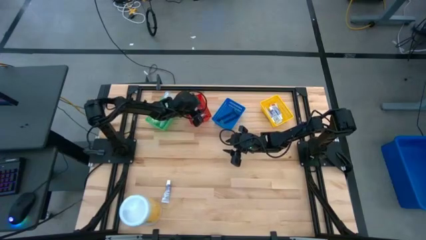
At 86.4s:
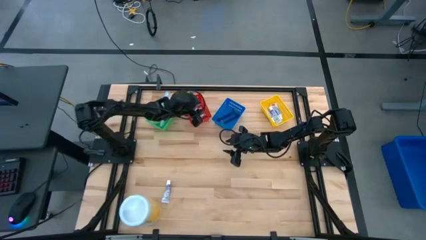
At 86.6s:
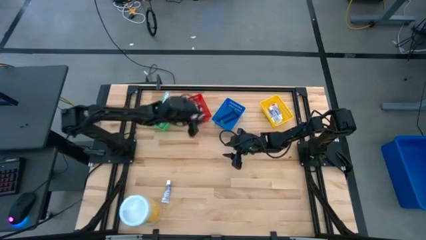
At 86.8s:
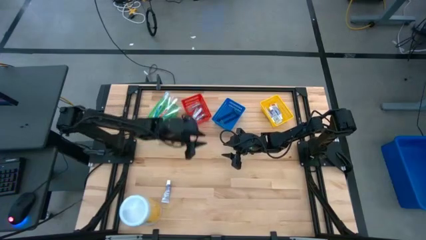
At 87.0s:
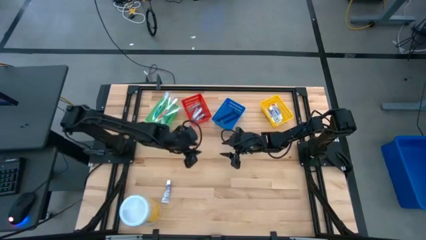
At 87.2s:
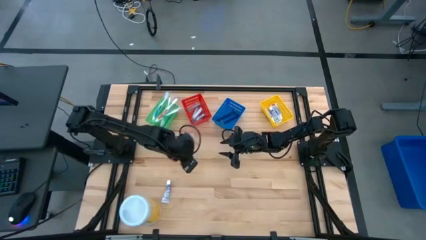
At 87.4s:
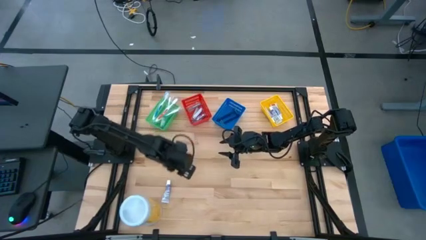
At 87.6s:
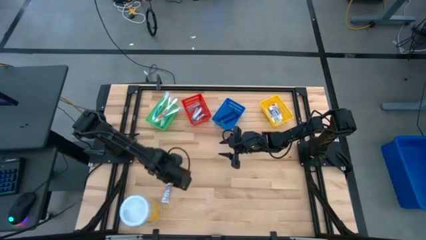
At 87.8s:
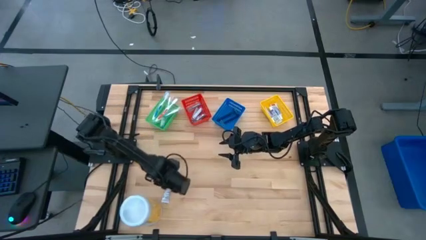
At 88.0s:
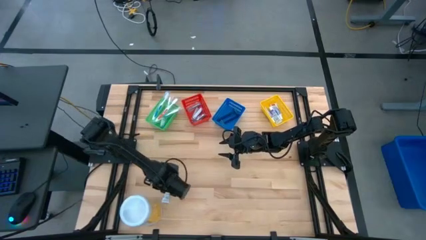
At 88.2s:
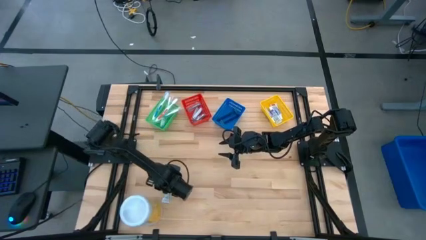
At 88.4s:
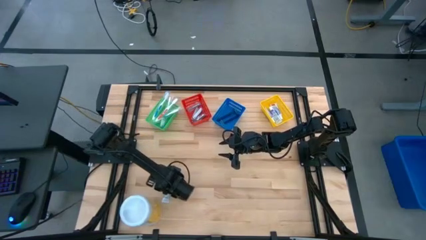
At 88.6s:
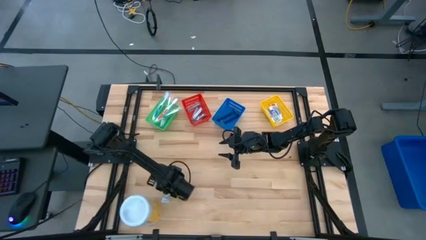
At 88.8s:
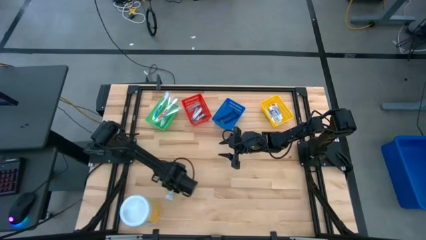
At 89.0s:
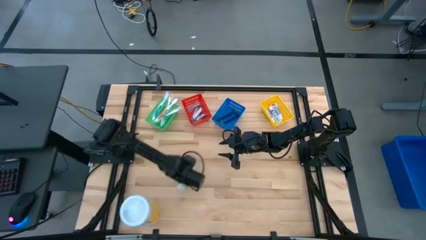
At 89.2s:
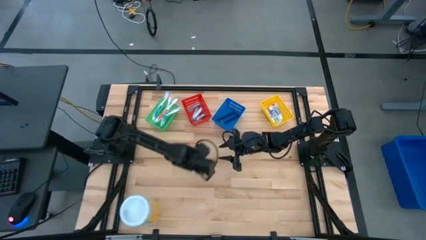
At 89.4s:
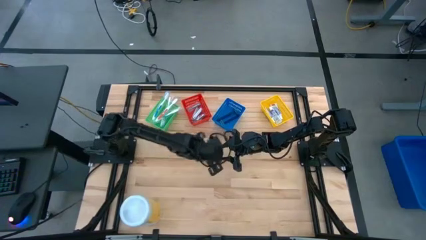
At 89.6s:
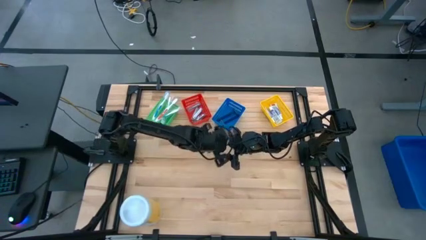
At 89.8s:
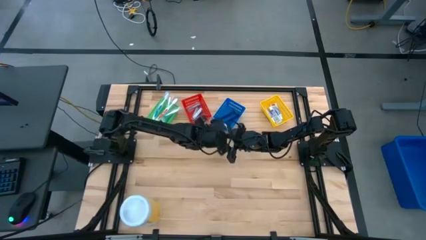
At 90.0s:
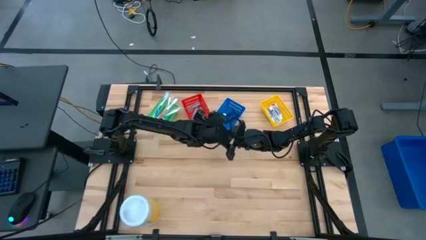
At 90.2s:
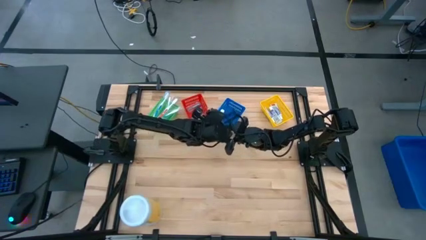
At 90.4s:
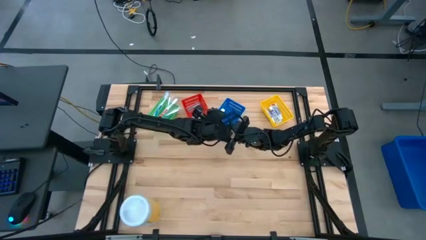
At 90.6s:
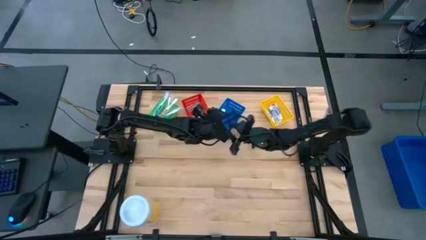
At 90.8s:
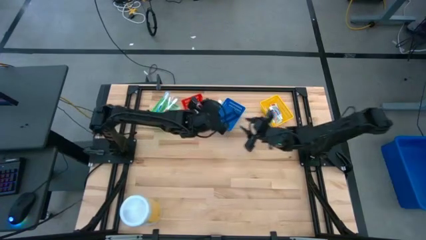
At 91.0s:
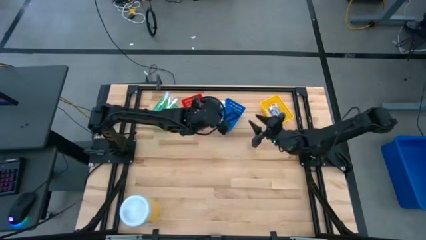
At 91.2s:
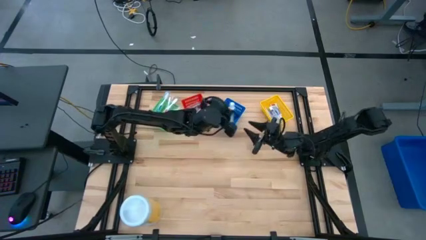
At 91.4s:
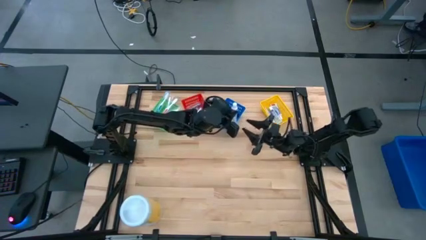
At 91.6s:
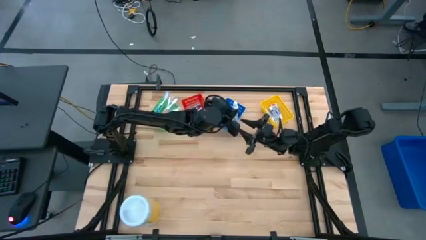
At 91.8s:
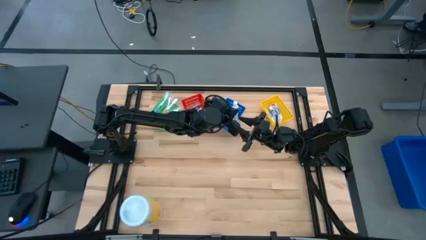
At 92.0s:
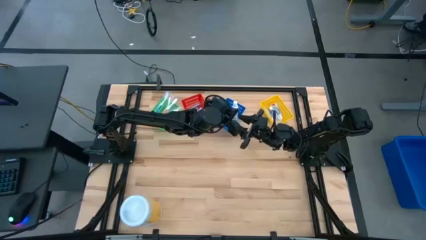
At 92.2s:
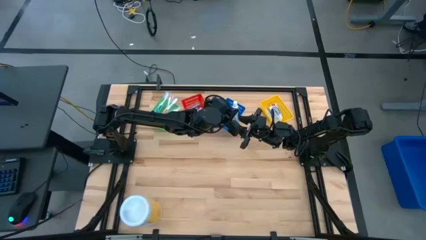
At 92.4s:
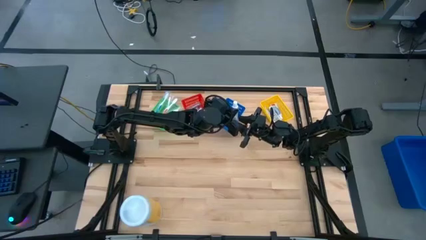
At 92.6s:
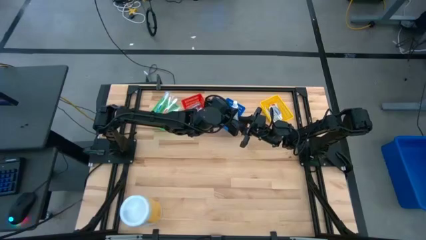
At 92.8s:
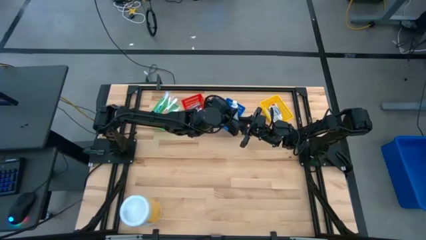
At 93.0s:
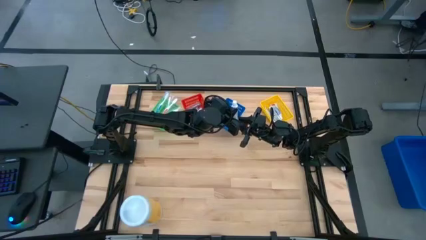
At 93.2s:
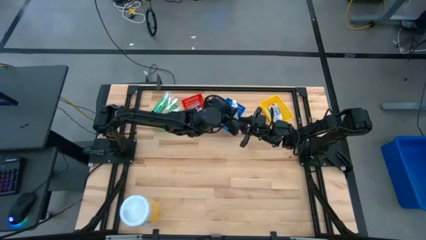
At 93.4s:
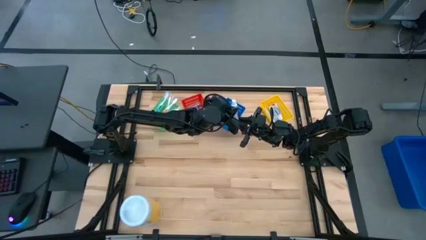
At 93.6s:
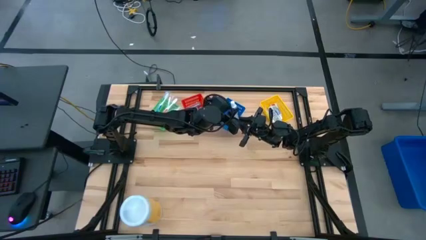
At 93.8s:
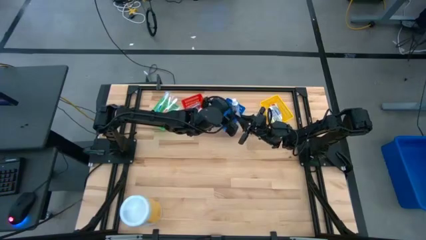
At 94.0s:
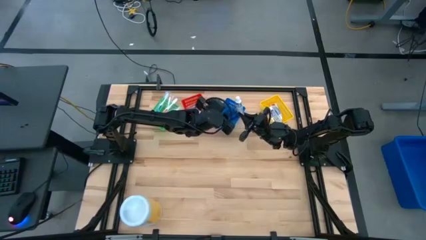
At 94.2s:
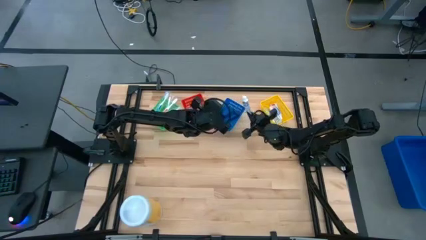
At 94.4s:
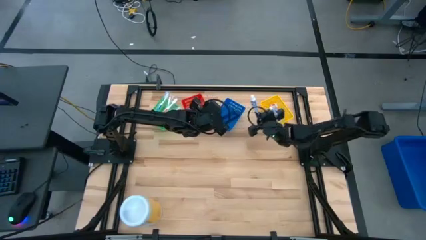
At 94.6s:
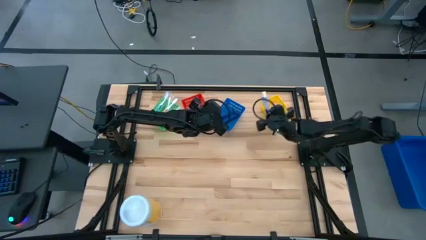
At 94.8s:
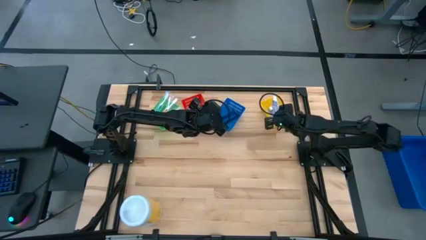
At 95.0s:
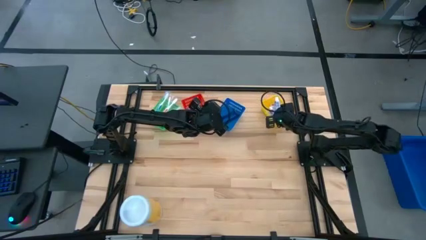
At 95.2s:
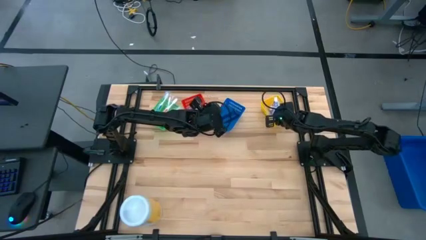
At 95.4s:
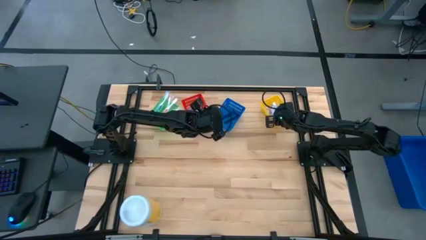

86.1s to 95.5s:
Task: Pick & Place Travel size toiletries
Put the toothpaste into the yellow basket

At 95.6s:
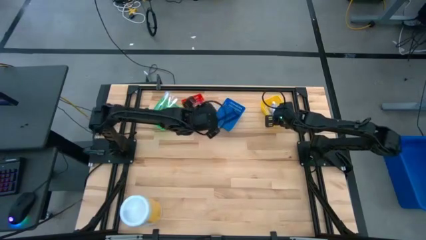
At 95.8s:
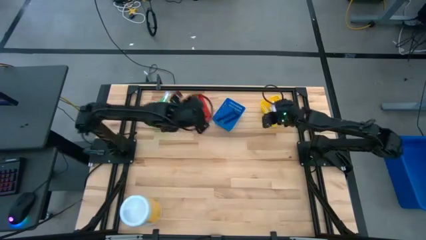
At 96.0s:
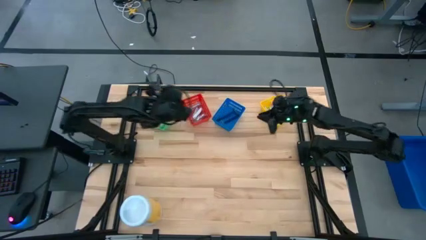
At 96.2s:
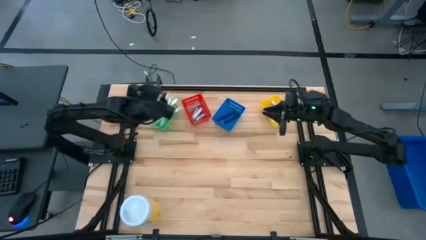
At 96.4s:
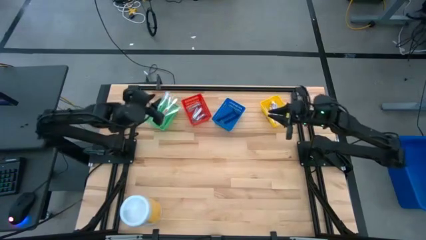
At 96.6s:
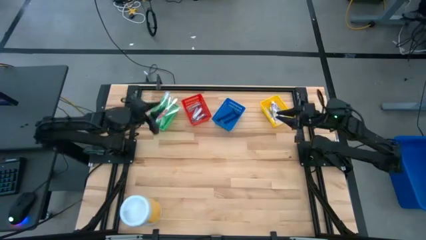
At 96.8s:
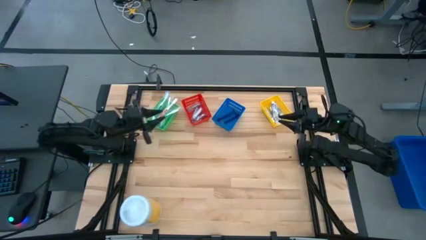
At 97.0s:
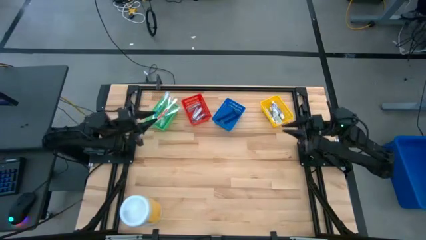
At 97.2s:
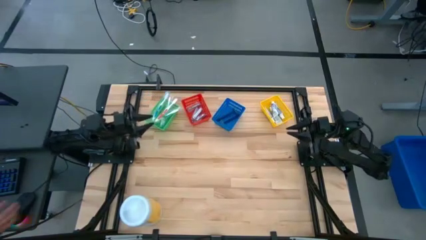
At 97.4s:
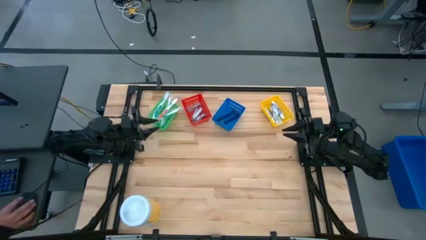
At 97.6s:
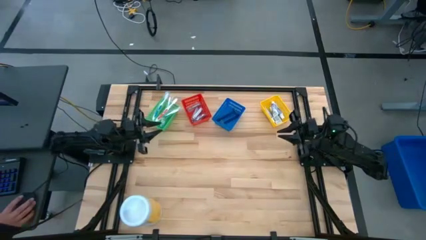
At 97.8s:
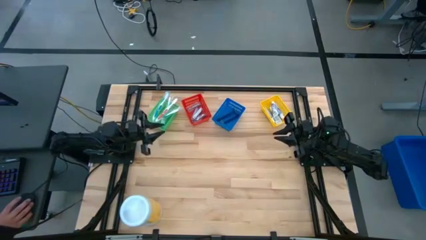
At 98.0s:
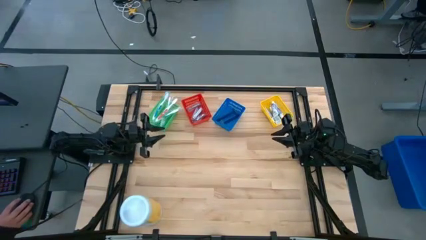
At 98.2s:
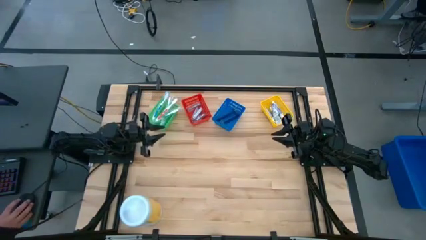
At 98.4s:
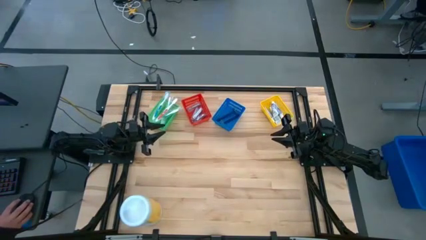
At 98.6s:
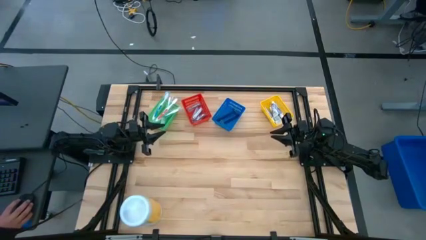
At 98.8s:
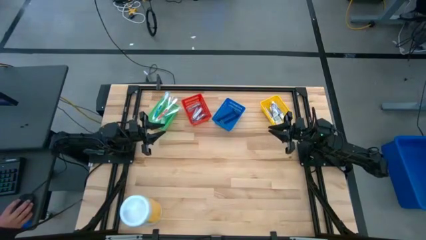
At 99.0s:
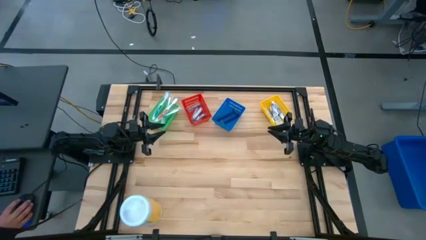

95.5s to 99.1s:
Return to Home Position

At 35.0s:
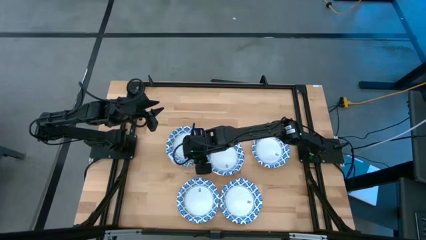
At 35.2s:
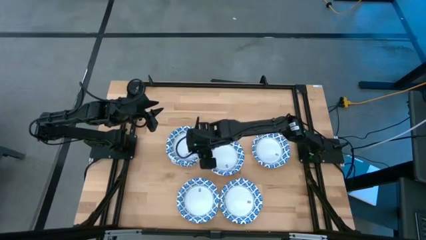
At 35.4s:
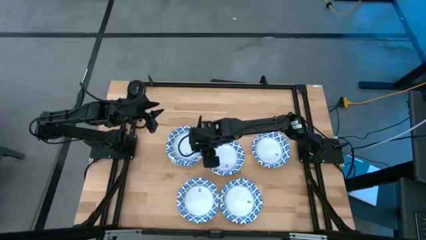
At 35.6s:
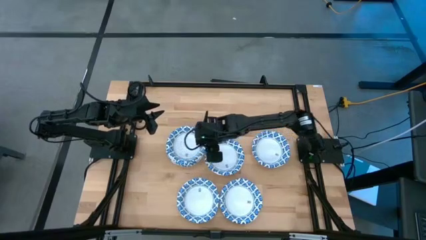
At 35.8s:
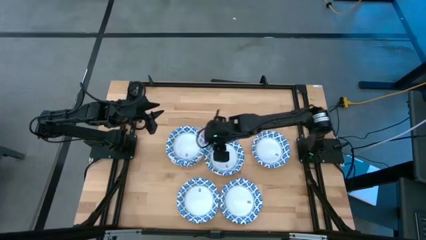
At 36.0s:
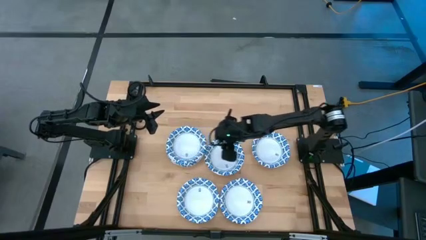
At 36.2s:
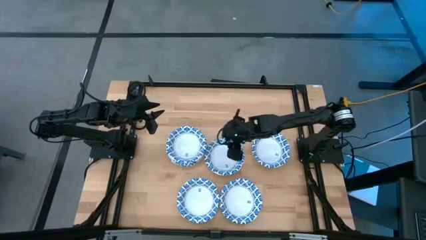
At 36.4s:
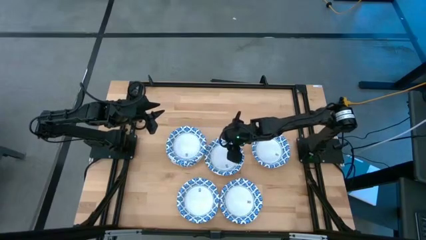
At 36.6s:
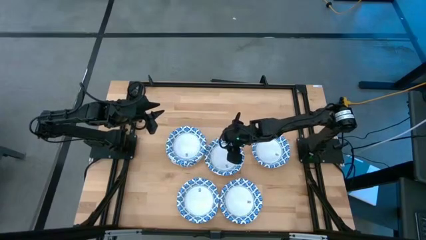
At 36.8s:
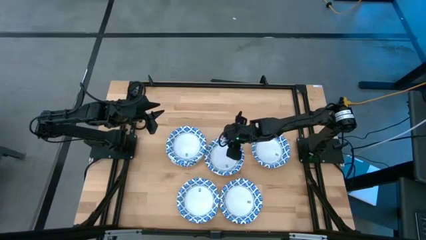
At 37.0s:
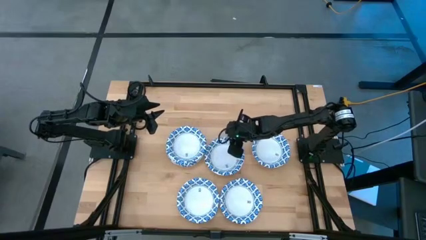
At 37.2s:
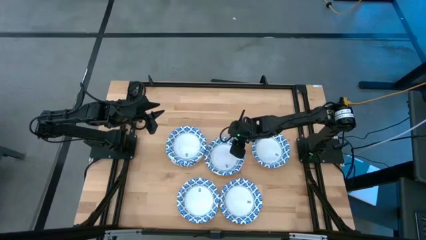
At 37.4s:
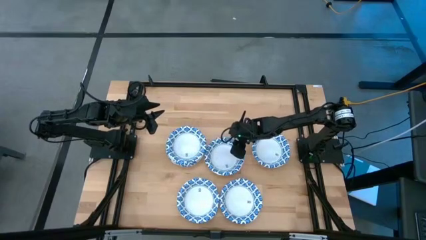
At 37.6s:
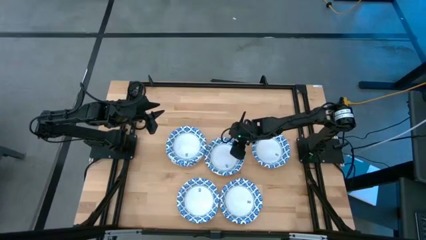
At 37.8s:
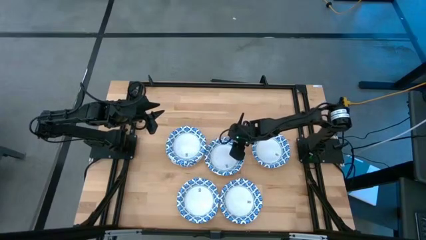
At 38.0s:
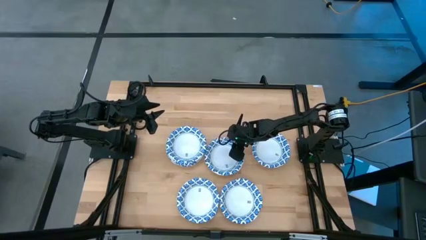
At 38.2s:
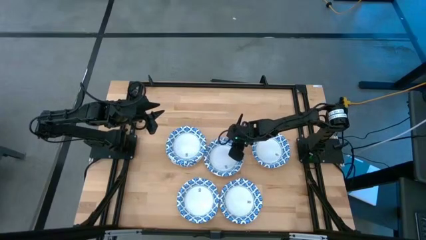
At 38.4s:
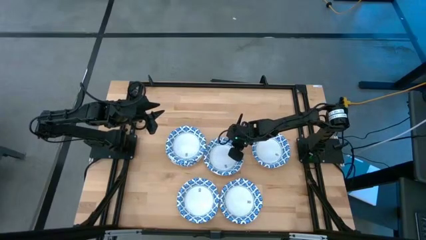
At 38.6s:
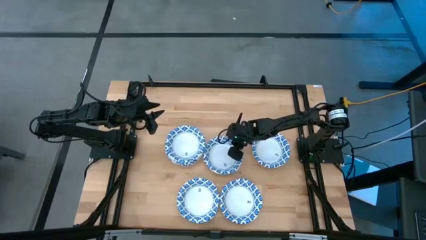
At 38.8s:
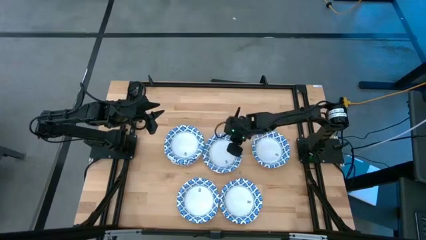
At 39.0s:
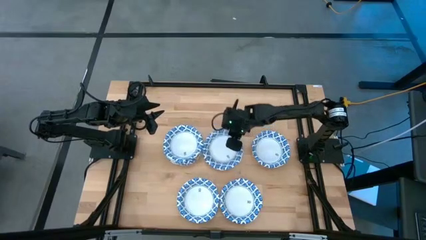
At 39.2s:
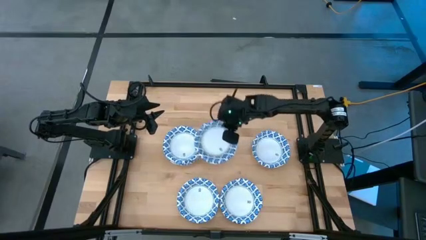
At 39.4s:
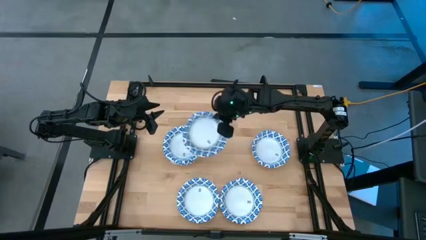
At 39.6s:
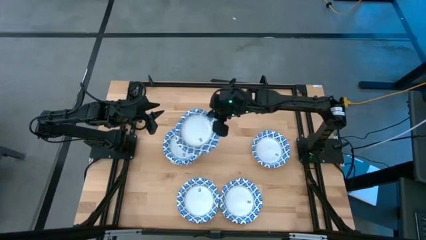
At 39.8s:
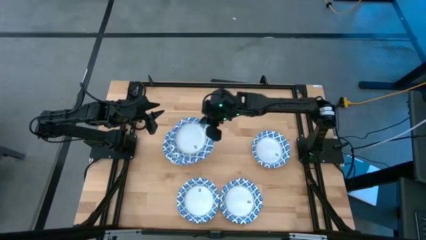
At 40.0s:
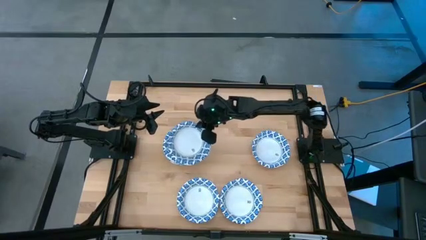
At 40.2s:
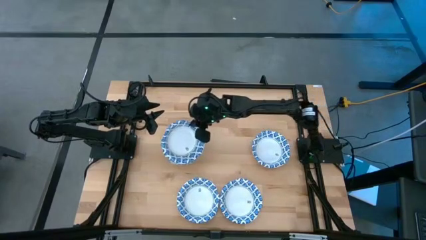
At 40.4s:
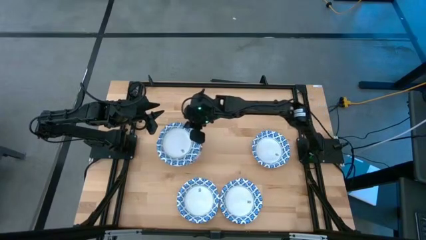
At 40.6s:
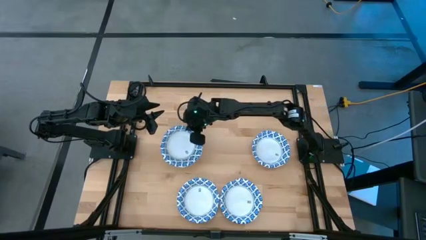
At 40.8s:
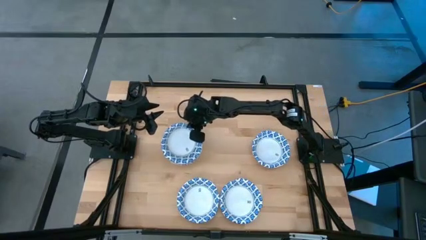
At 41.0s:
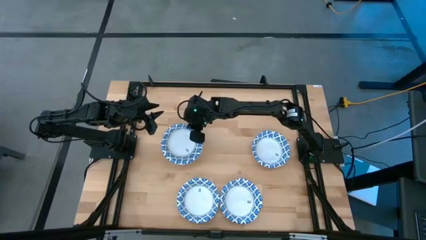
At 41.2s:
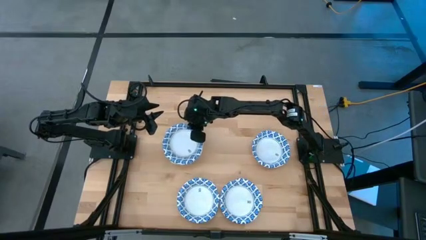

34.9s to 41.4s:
Task: Nest bowls inside each other
Stack the white bowl on the white bowl
